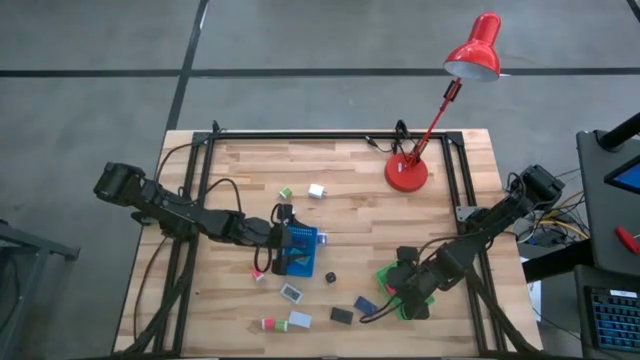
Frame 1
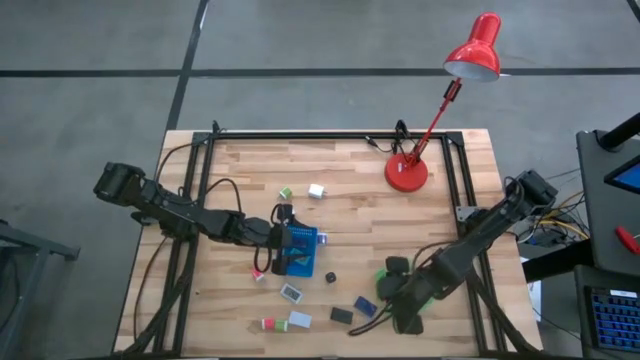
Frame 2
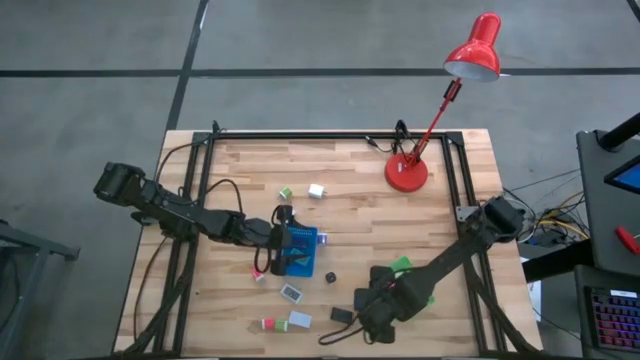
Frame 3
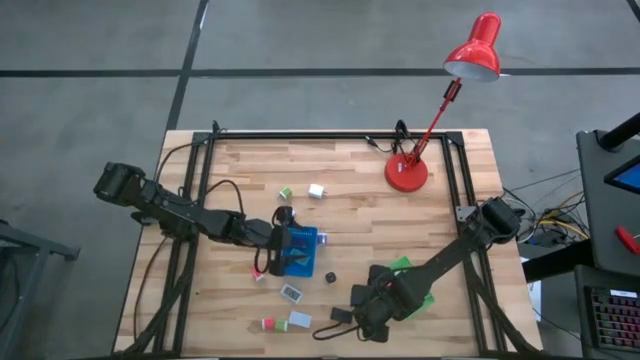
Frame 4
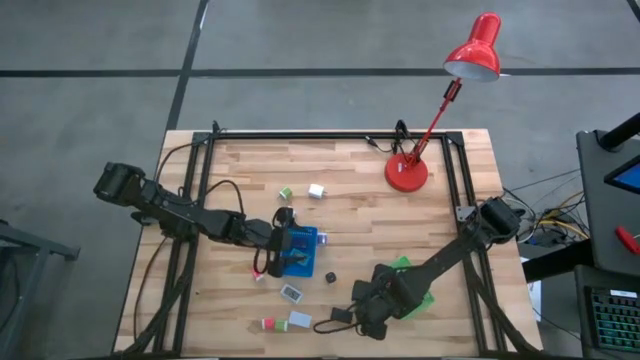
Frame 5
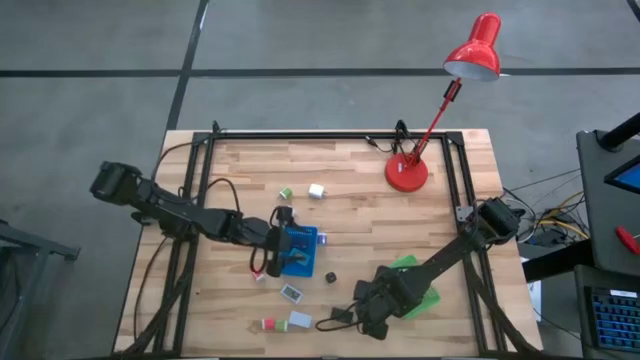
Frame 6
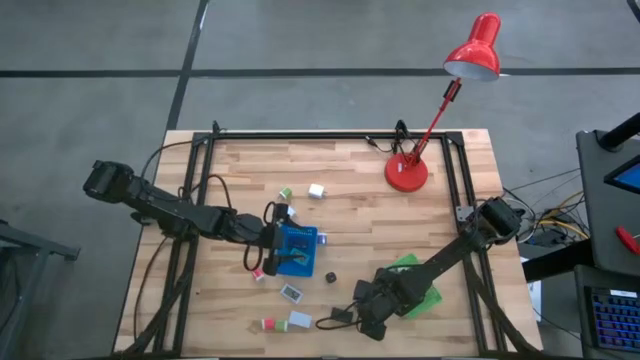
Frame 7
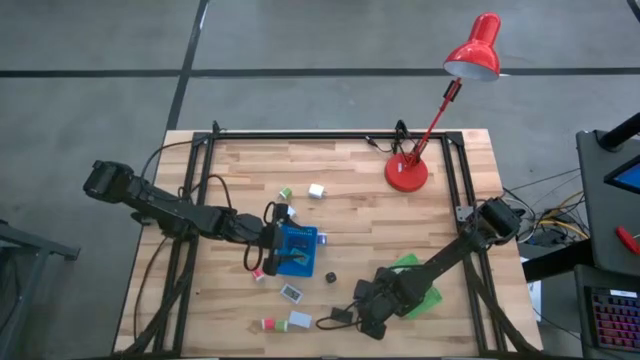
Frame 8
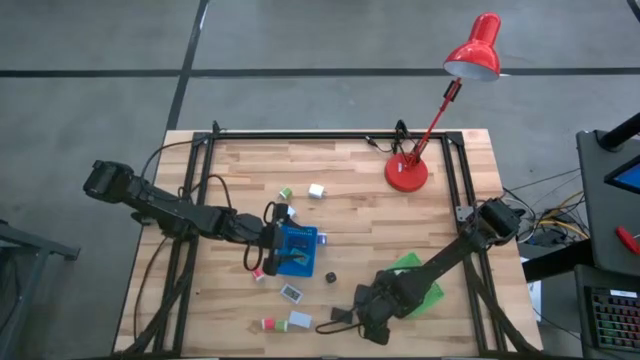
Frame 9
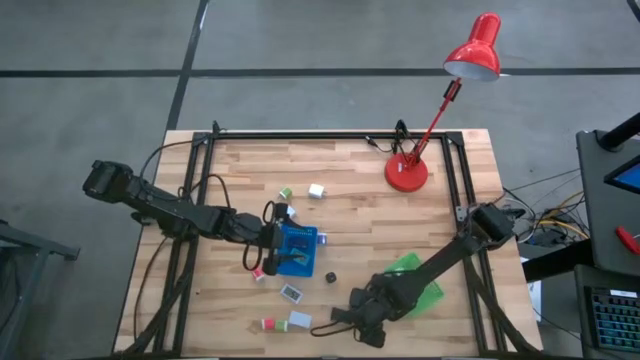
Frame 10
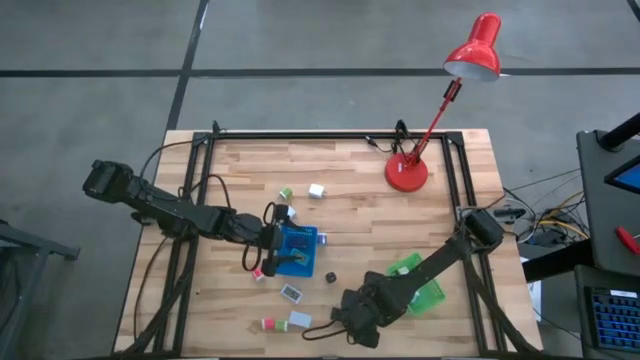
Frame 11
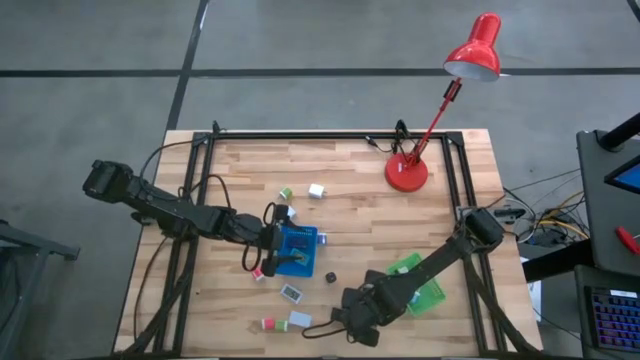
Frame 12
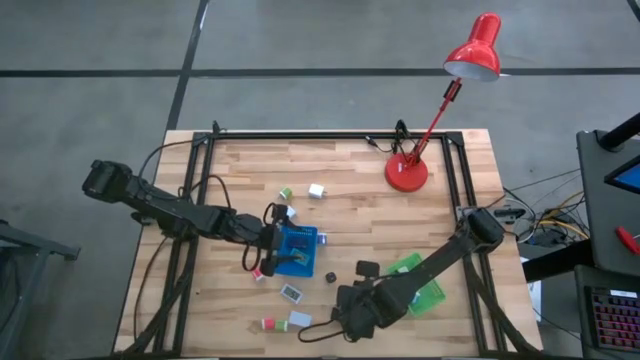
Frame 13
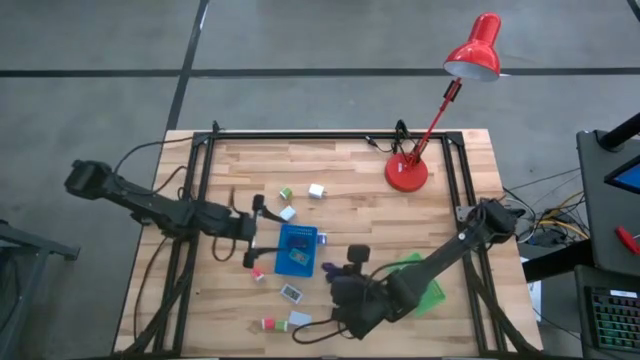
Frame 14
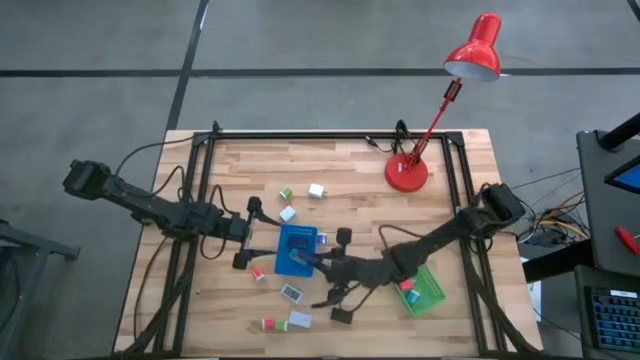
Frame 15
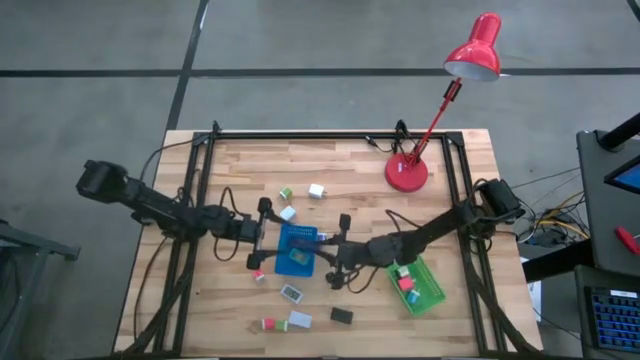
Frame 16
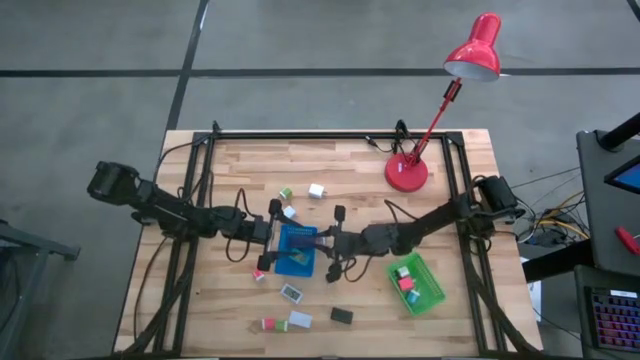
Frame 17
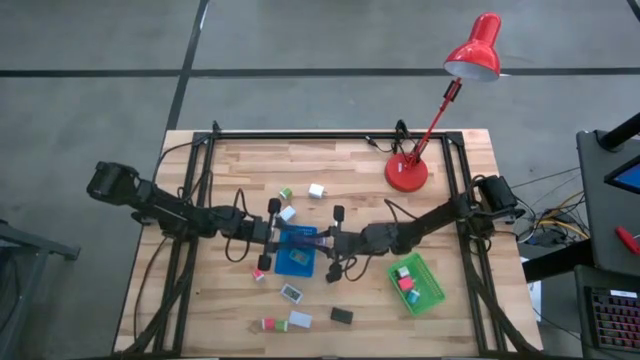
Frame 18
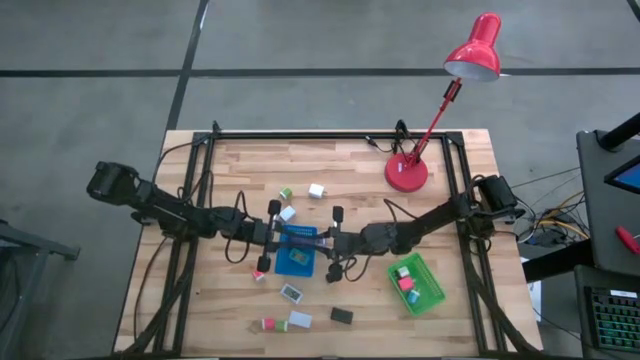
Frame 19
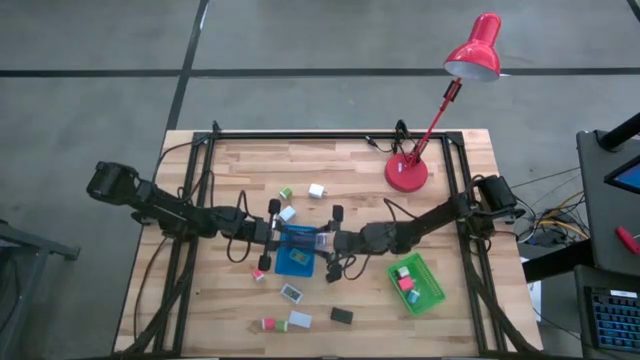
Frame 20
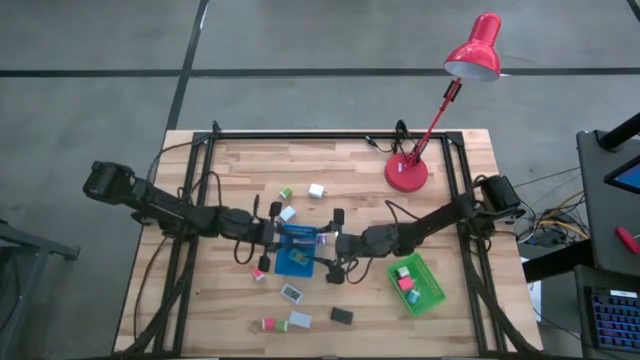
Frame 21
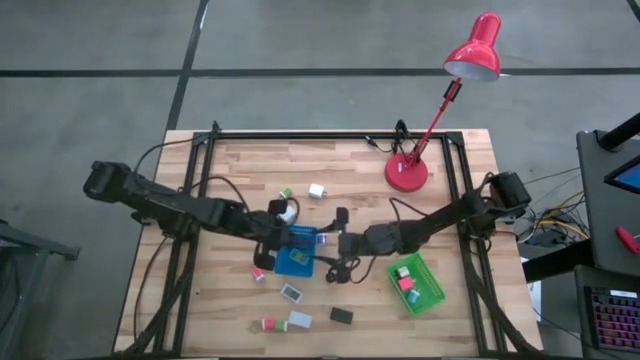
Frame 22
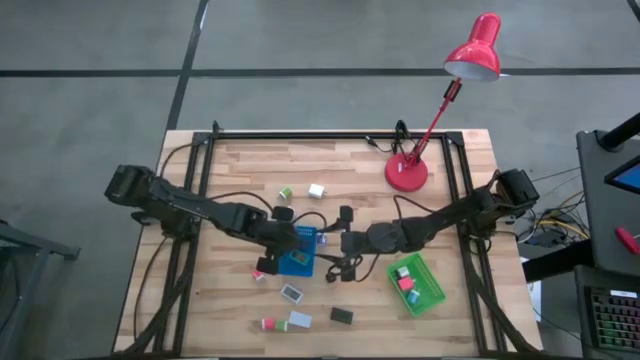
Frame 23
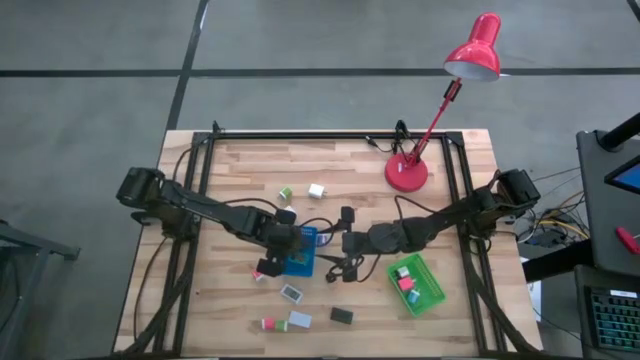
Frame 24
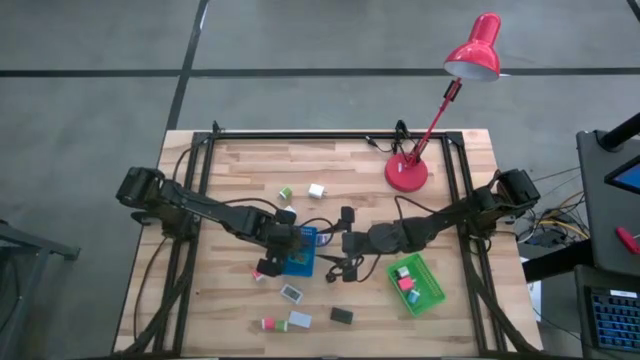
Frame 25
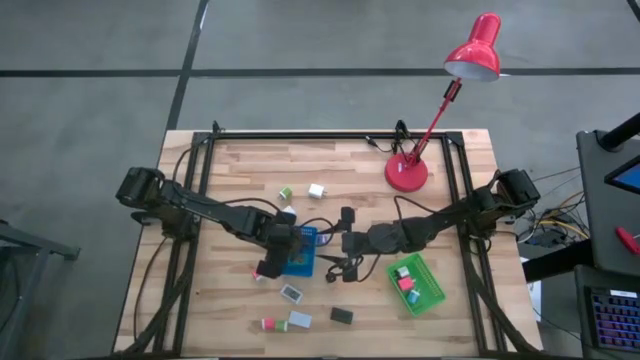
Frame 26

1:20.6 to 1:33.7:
Task: Pick & Place Office items
Put the violet digital clock into the blue bin

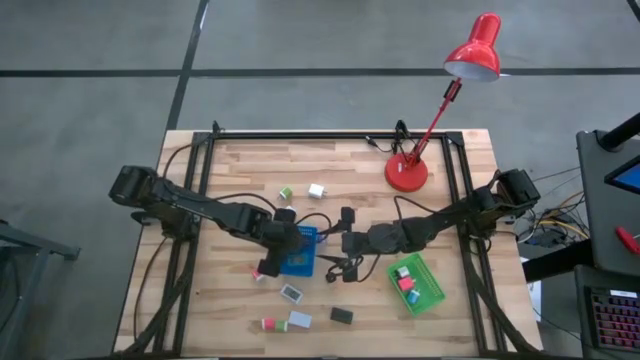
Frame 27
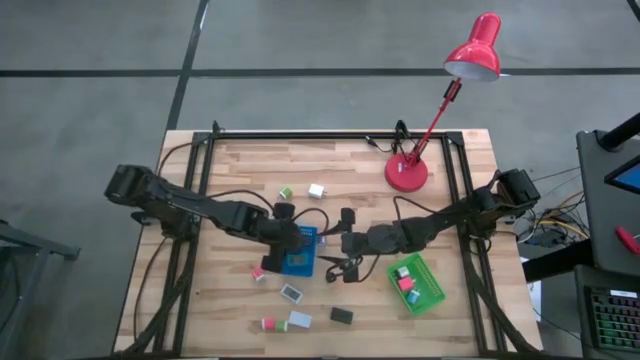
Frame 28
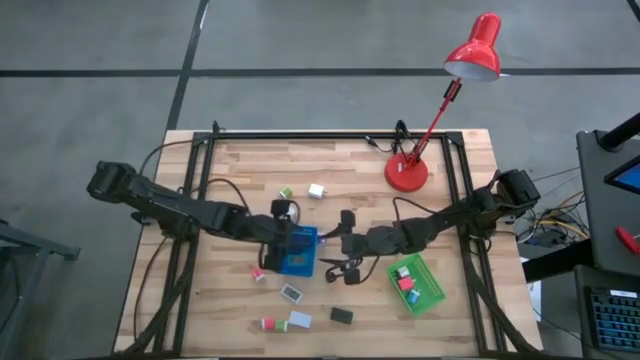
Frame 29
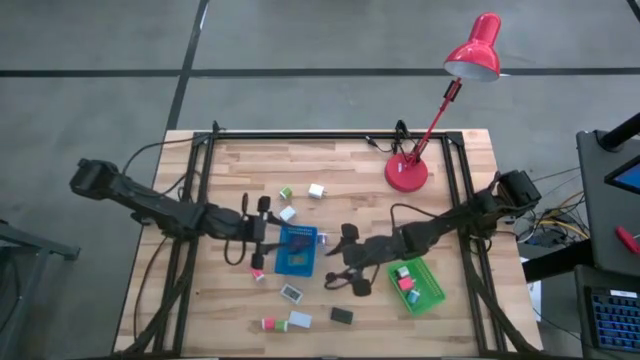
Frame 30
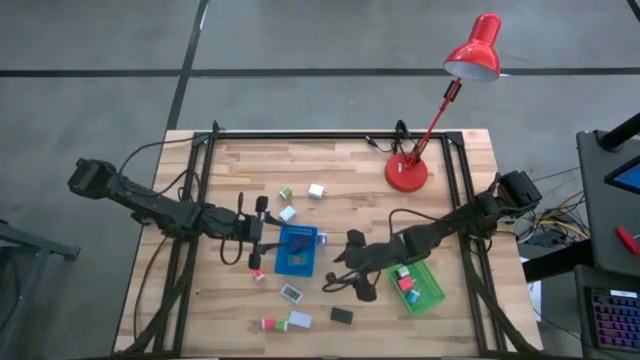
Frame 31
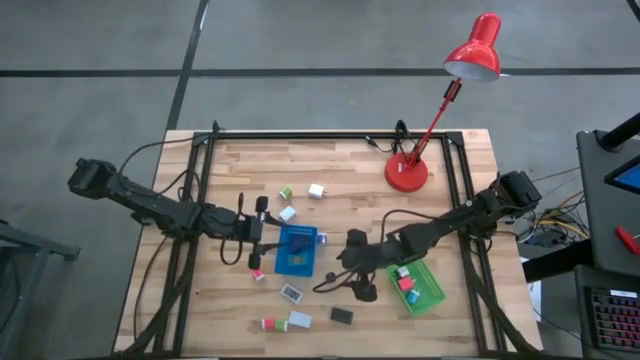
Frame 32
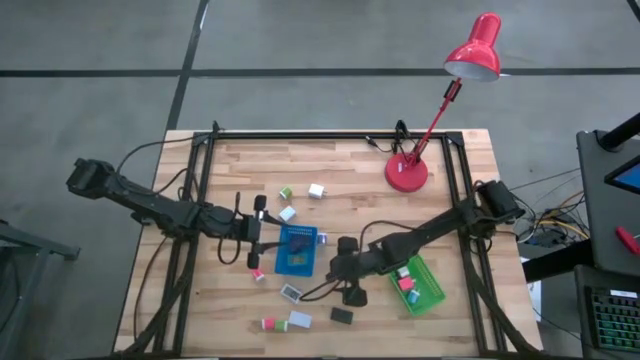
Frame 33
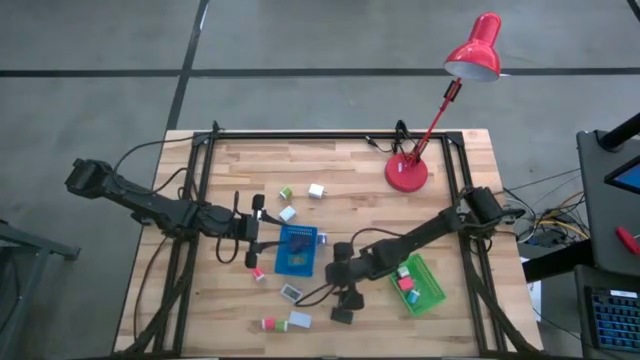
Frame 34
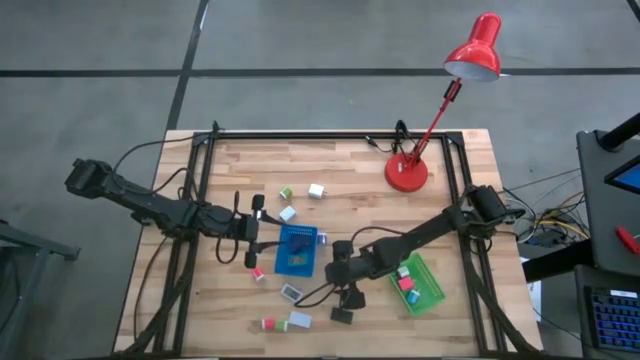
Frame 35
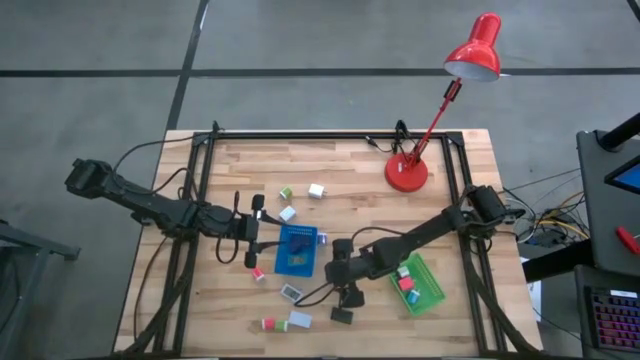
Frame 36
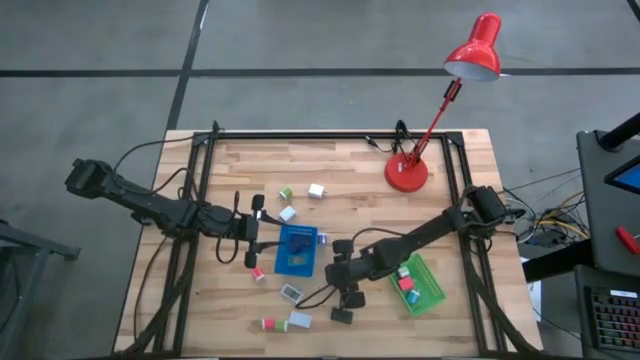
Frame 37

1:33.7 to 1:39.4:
Put the white black charger adapter into the green bin
